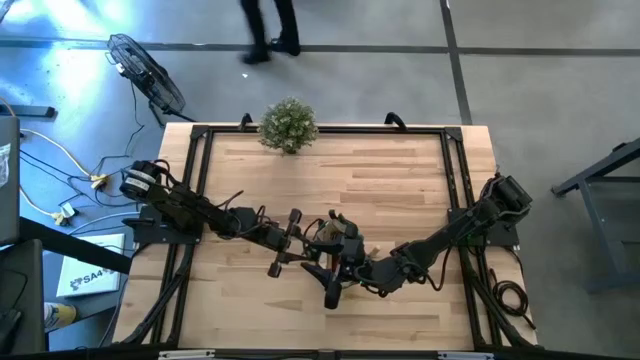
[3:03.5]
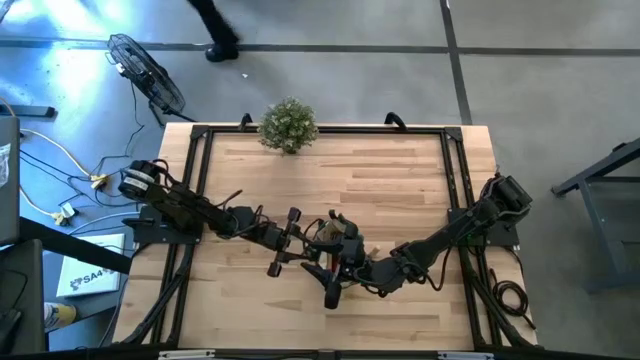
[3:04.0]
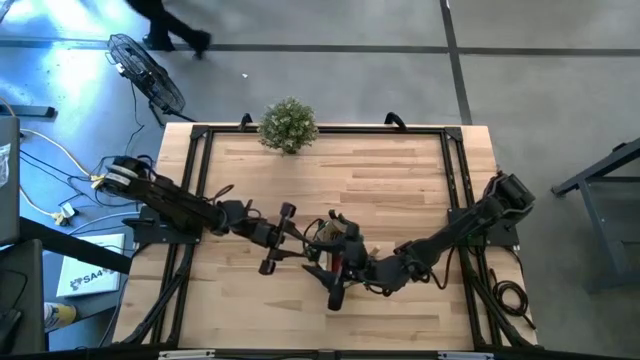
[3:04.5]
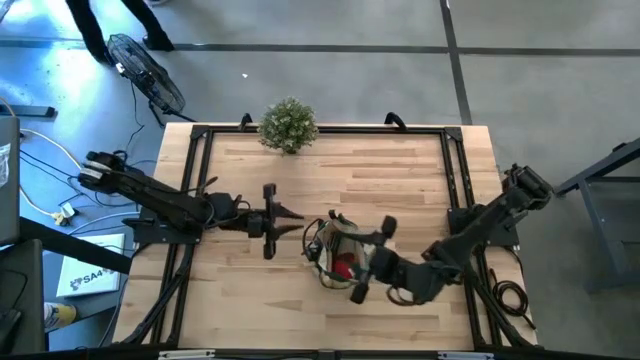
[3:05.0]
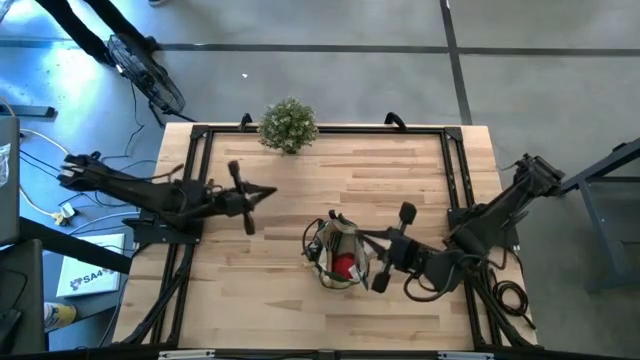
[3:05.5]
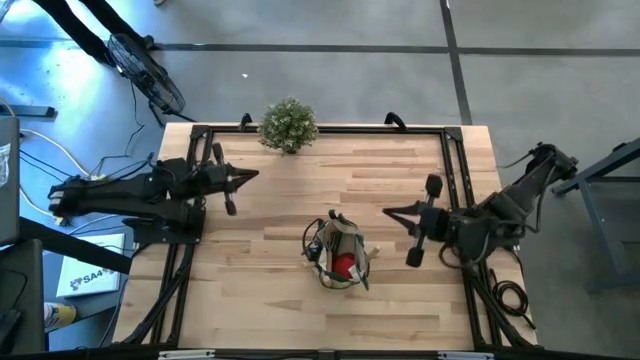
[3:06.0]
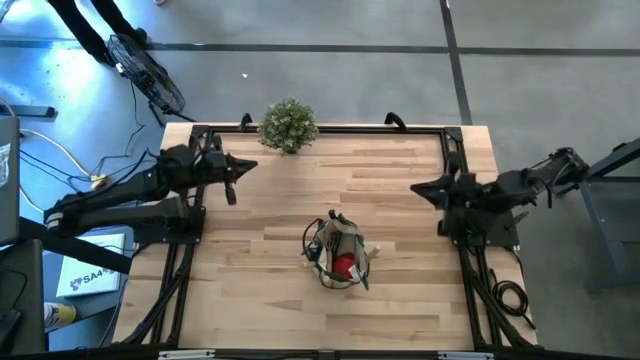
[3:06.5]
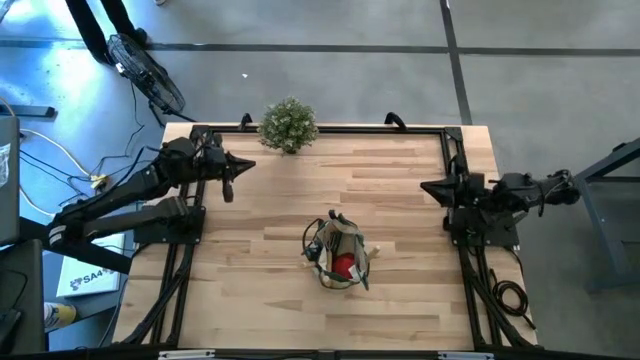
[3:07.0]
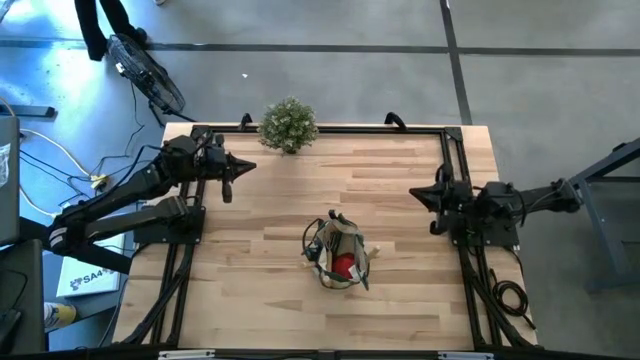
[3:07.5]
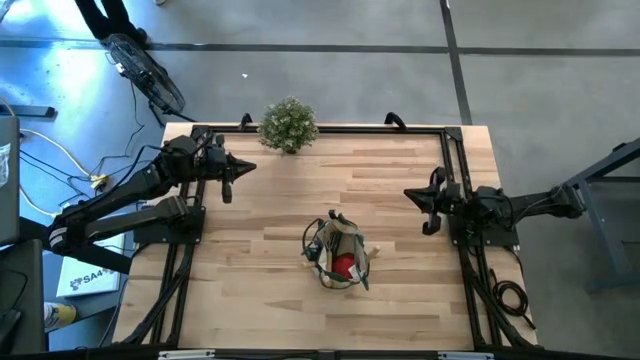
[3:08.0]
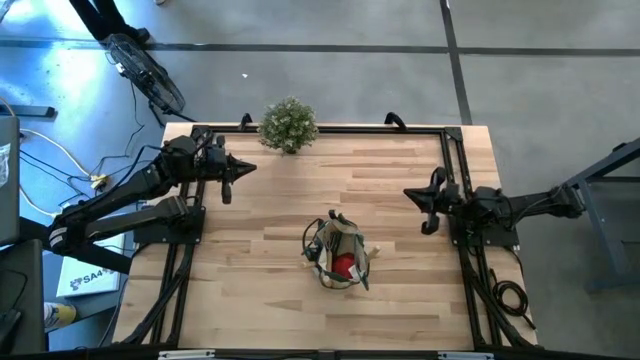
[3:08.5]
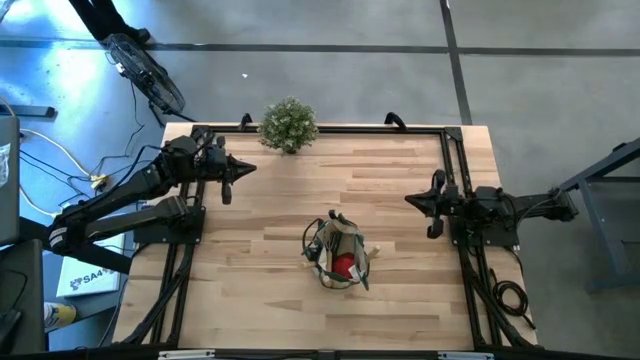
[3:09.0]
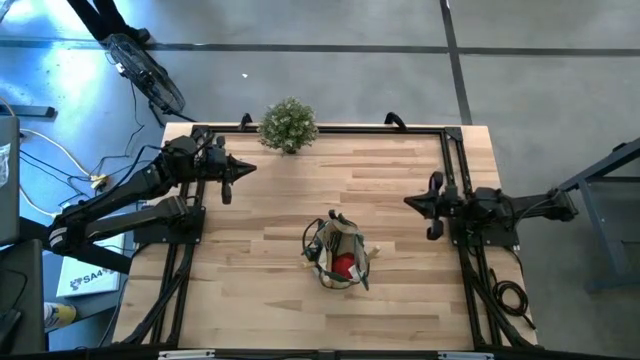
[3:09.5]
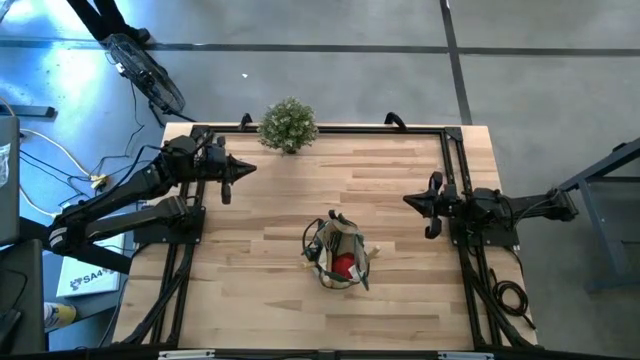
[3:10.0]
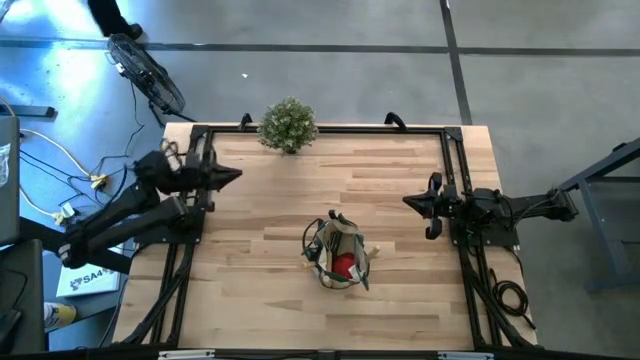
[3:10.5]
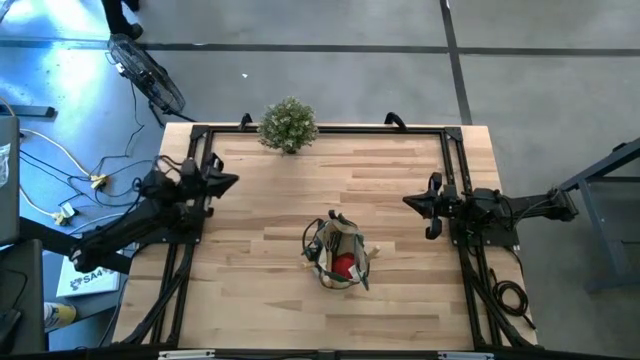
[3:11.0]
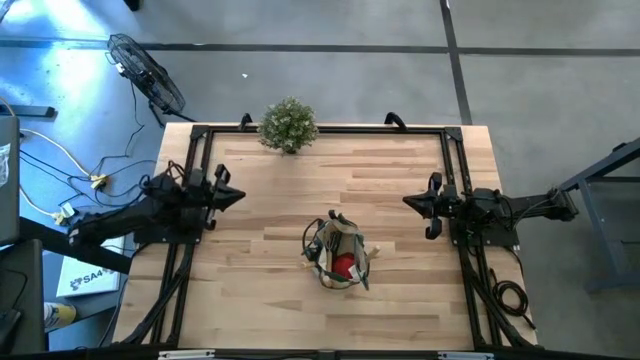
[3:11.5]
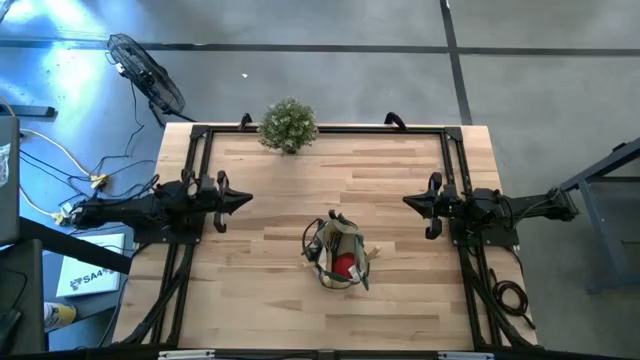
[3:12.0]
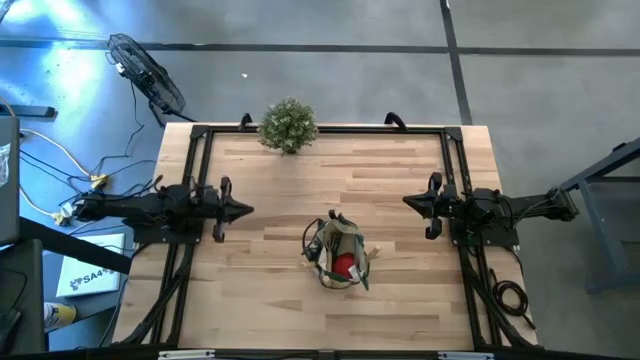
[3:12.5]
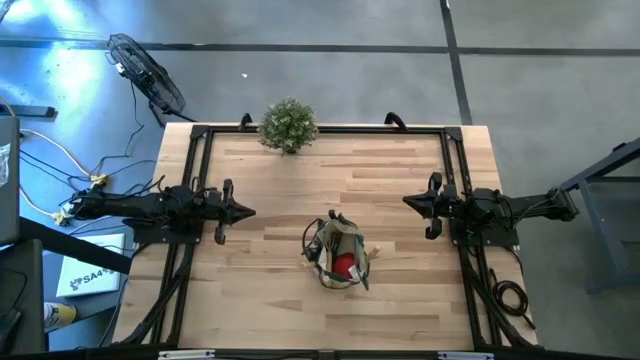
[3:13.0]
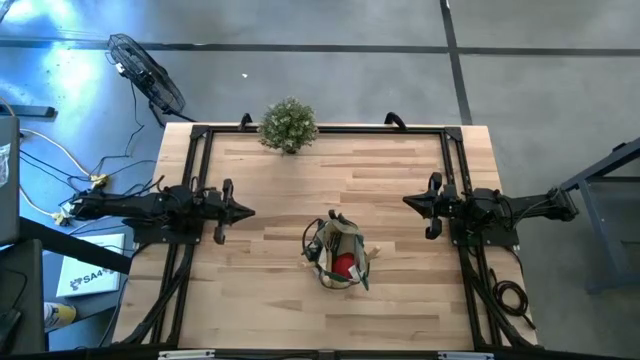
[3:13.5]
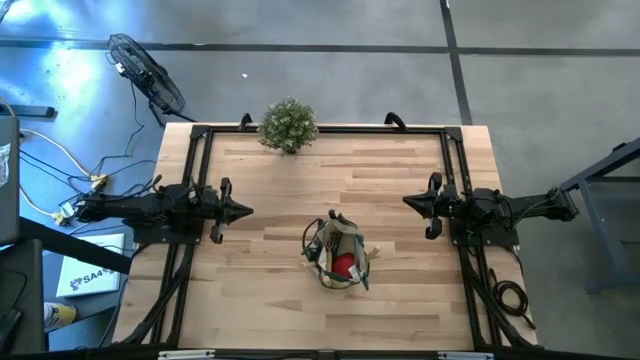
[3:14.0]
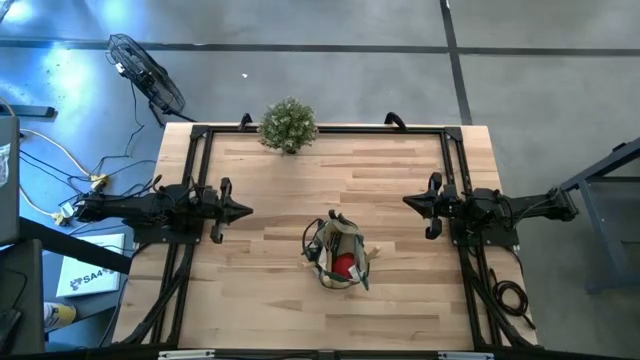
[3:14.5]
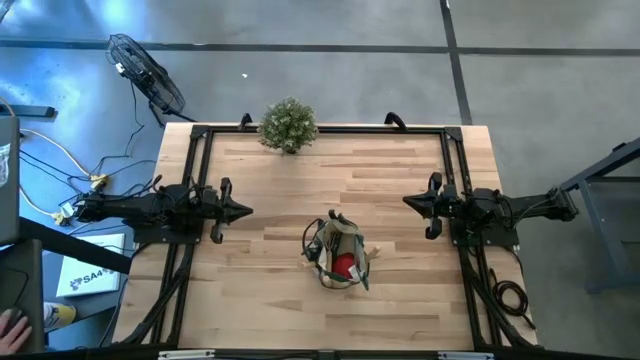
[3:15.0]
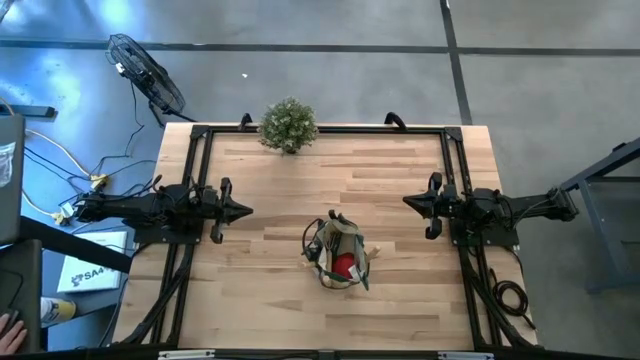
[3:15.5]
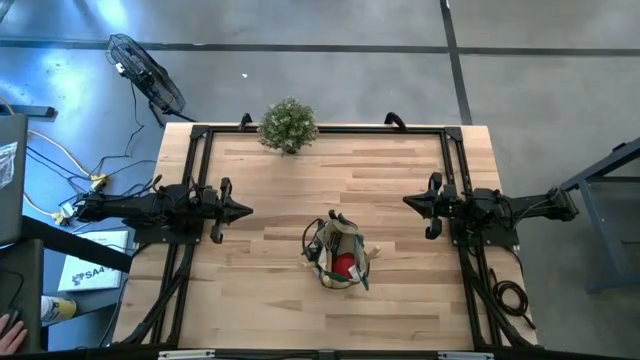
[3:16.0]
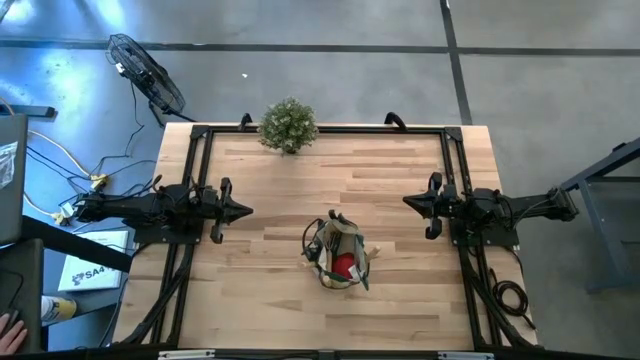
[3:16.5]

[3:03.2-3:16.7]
Task: Pick & Place Garden tools in Gardening bag
Return to Home Position

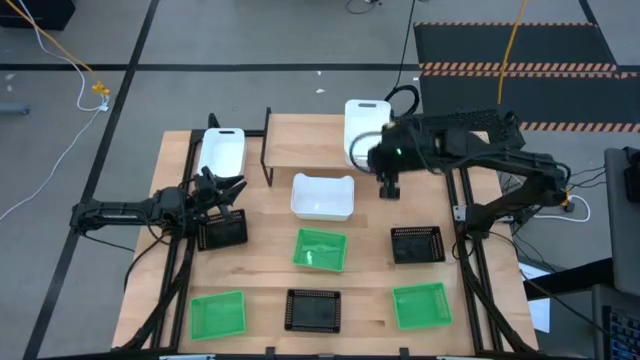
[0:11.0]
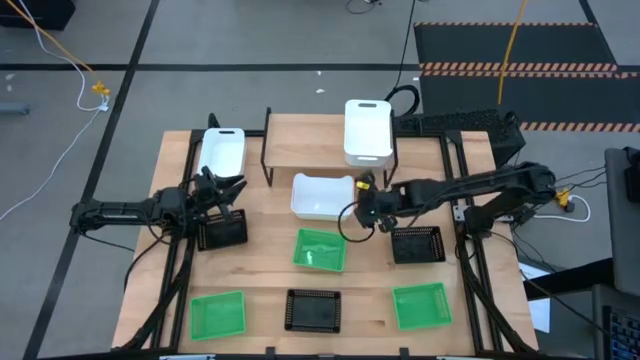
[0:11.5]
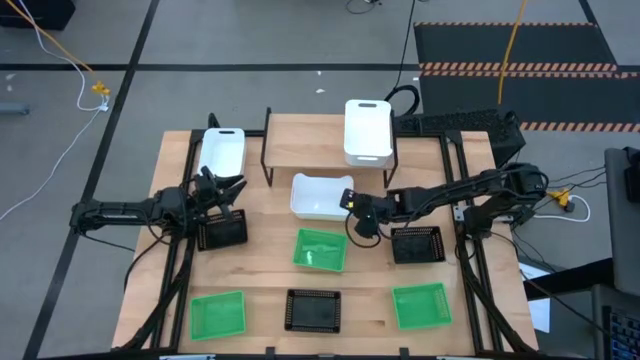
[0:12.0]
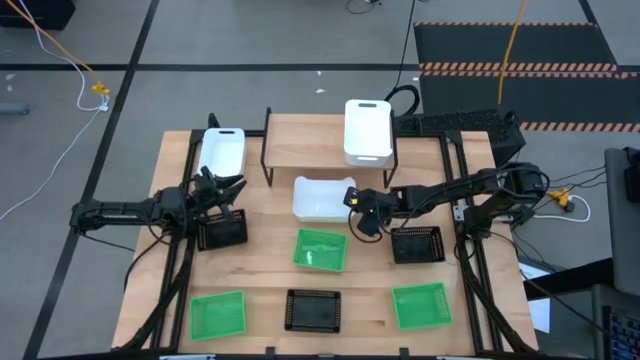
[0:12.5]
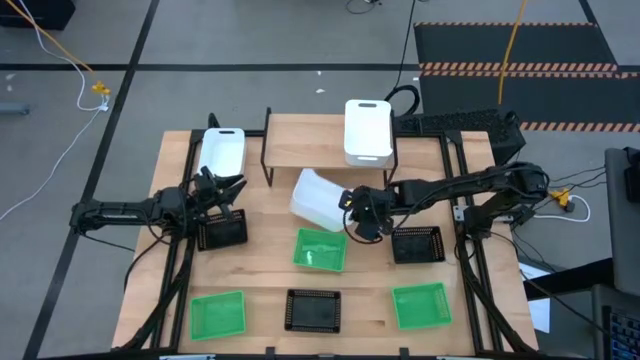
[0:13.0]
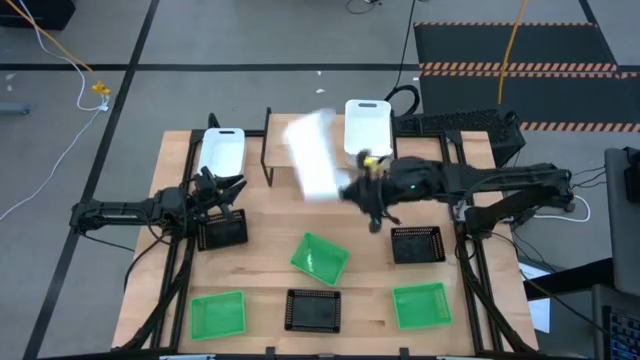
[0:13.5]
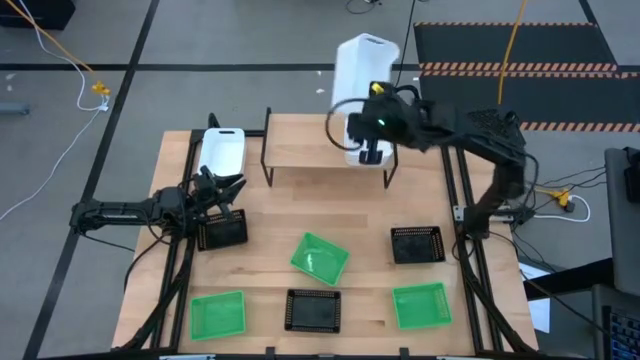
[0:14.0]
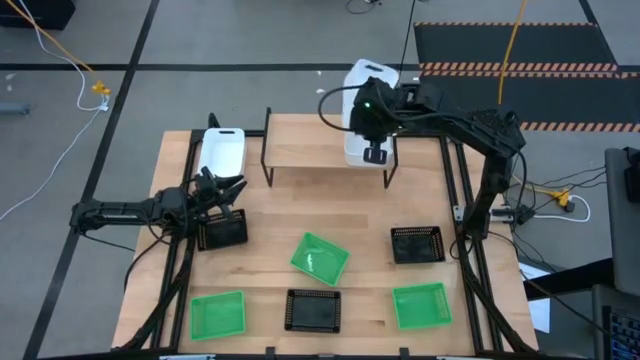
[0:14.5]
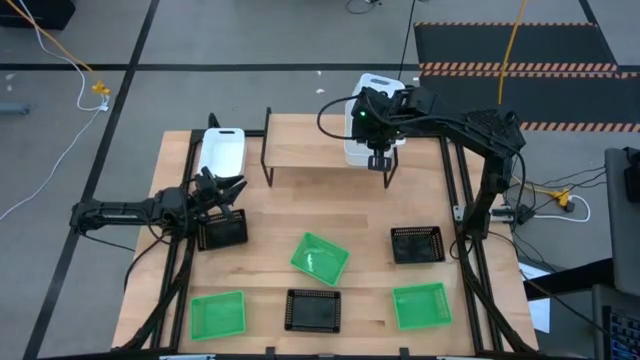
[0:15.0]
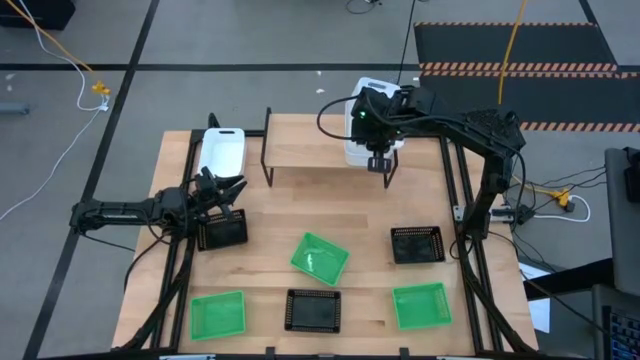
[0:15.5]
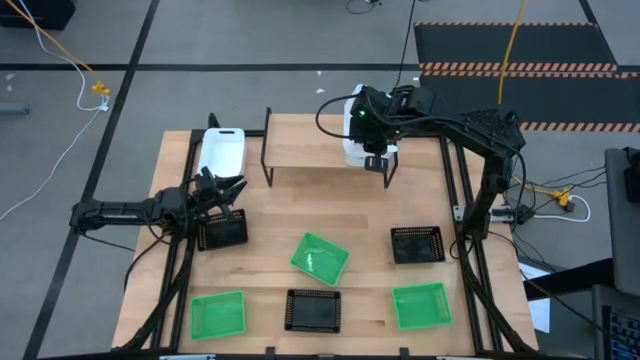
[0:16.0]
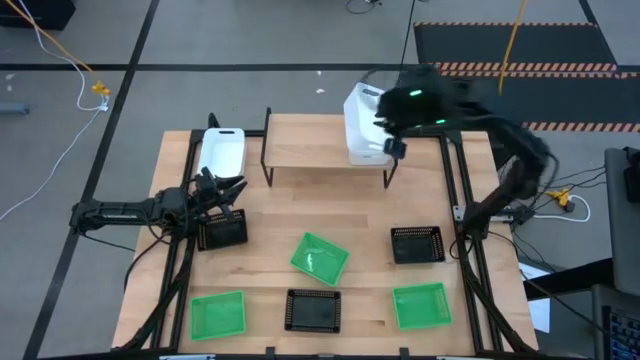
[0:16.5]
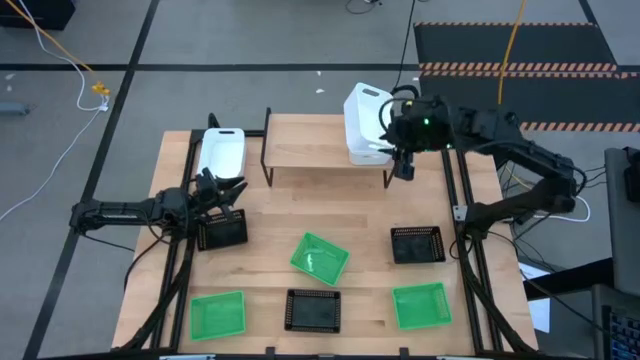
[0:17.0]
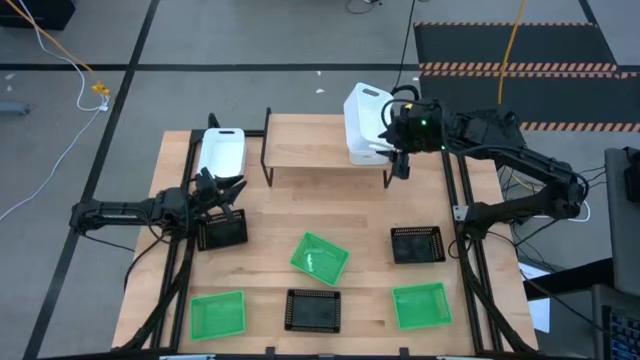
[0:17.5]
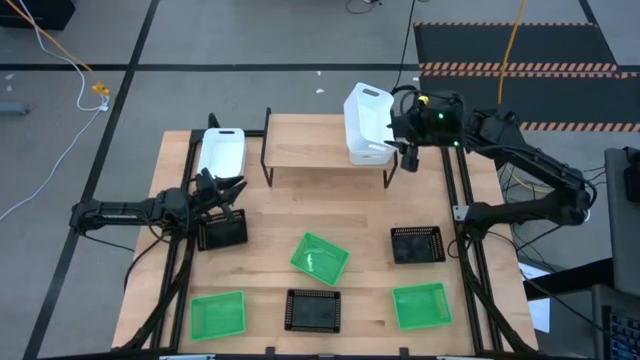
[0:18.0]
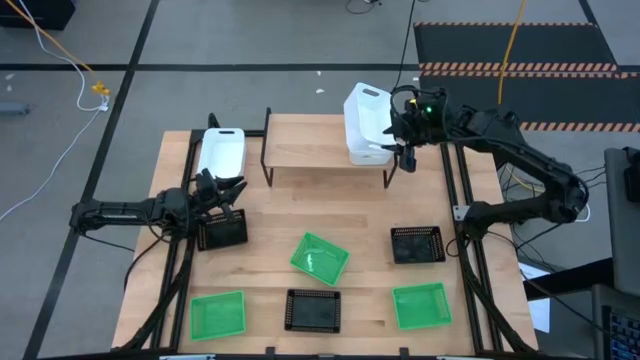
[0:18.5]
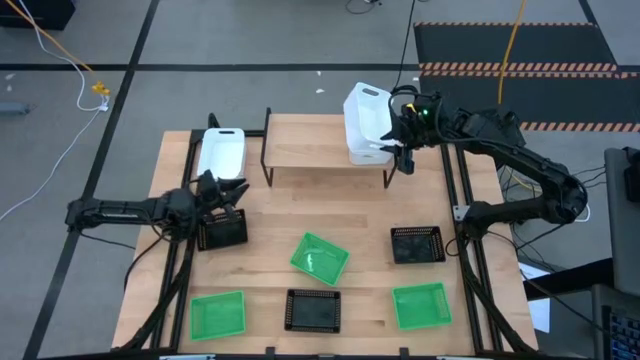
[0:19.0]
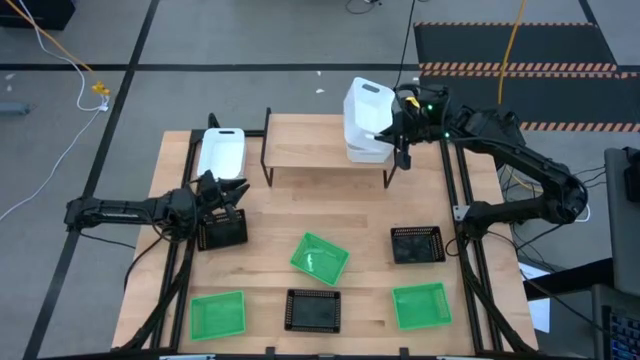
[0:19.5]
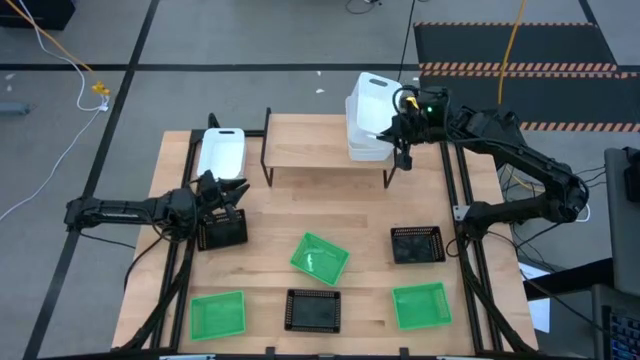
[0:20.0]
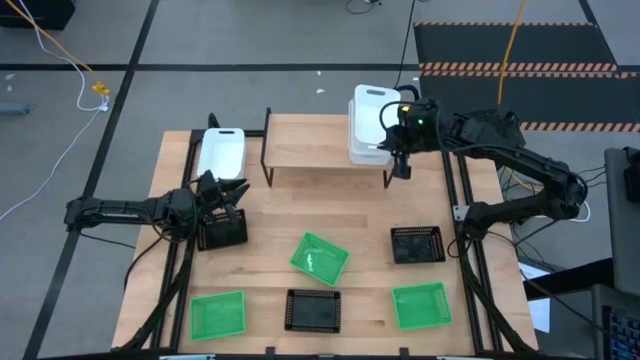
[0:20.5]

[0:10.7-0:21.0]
Task: Stack baskets on shelf by color
Stack the center white bin on top of the other white bin on the shelf
